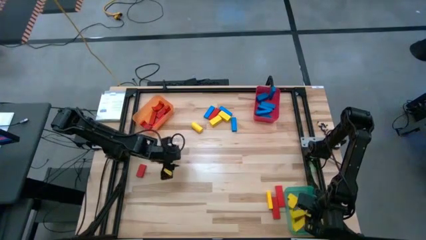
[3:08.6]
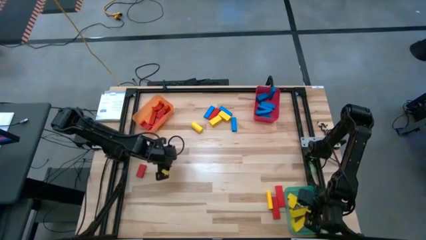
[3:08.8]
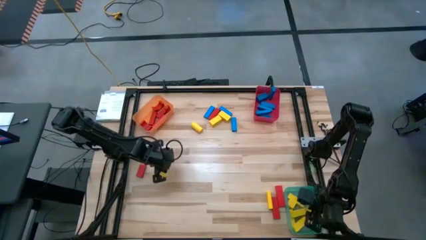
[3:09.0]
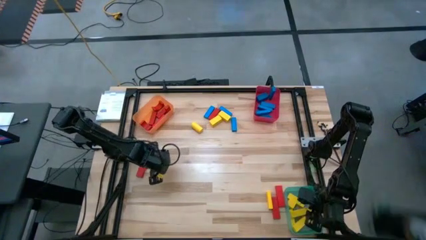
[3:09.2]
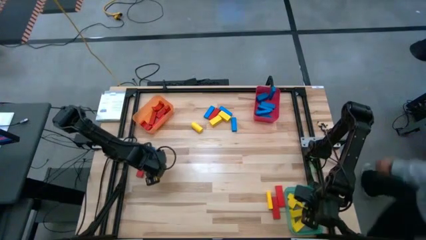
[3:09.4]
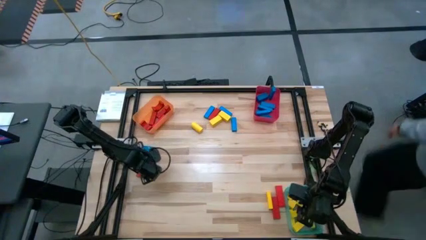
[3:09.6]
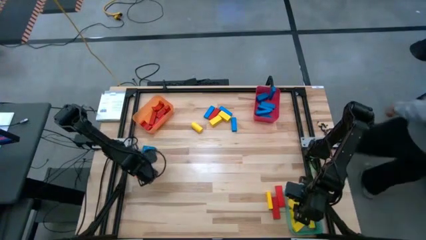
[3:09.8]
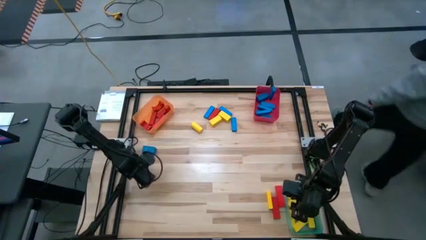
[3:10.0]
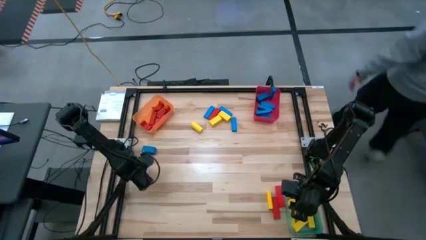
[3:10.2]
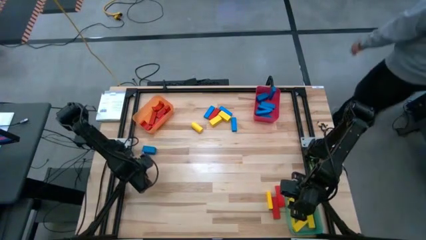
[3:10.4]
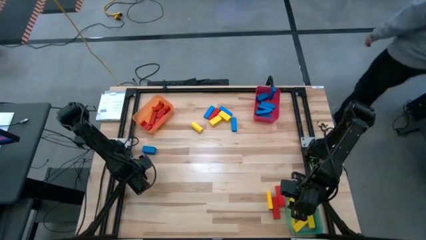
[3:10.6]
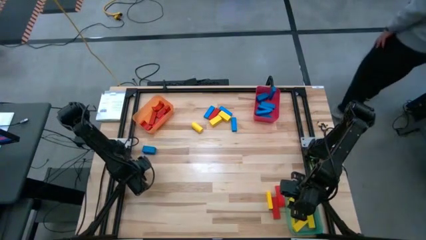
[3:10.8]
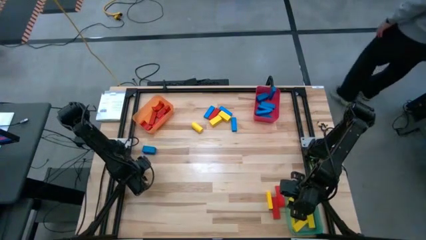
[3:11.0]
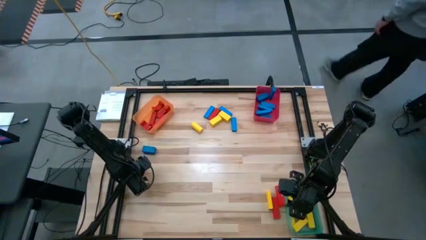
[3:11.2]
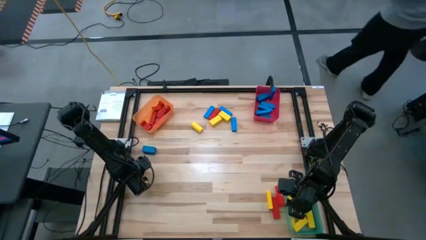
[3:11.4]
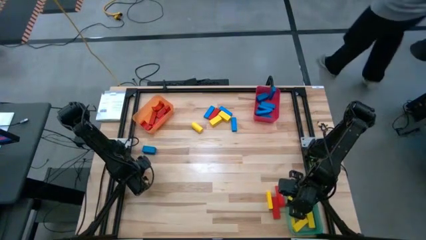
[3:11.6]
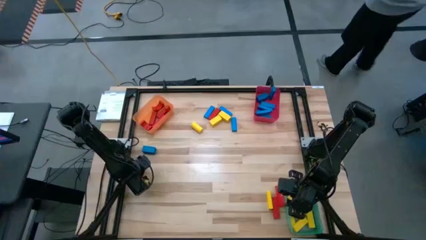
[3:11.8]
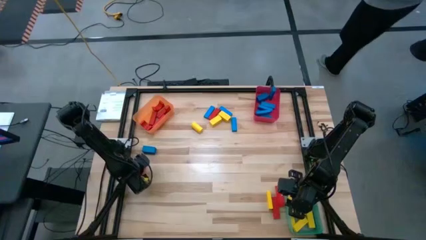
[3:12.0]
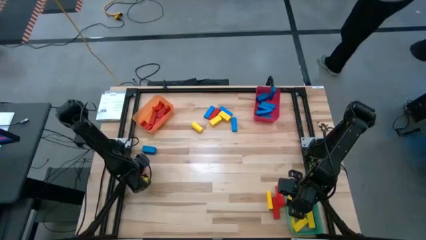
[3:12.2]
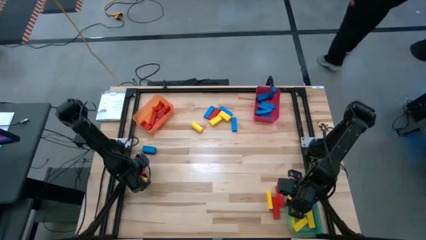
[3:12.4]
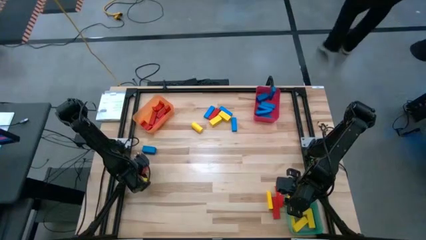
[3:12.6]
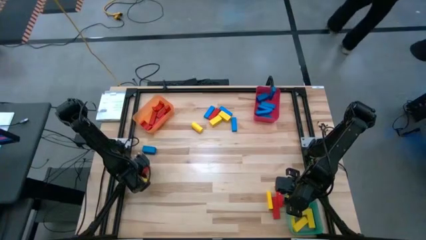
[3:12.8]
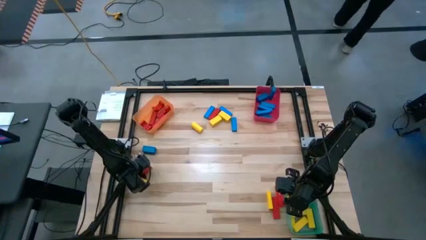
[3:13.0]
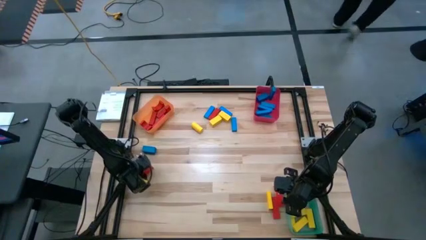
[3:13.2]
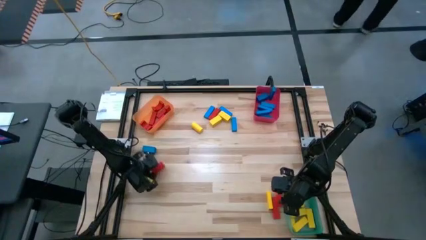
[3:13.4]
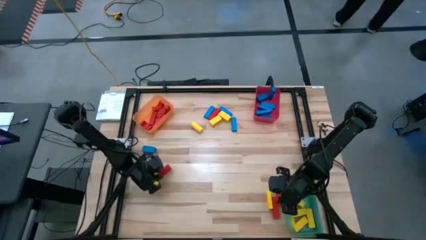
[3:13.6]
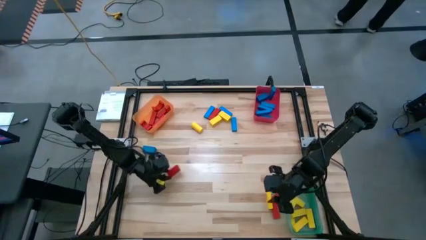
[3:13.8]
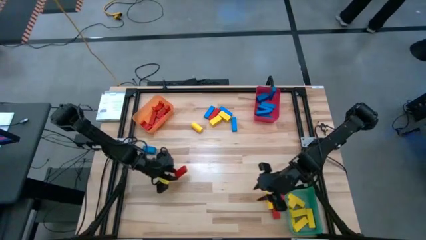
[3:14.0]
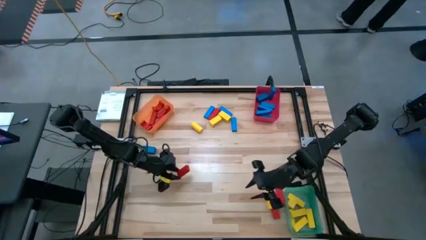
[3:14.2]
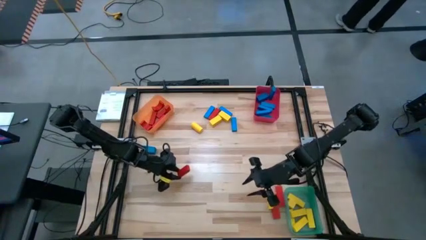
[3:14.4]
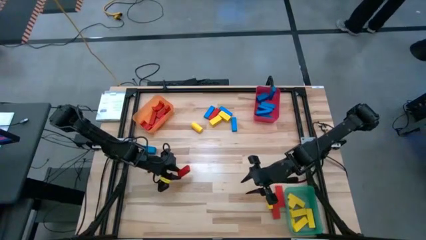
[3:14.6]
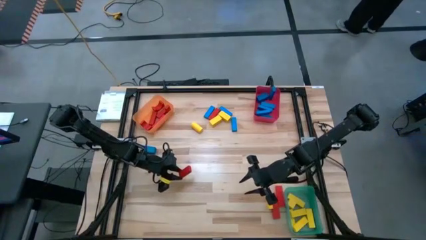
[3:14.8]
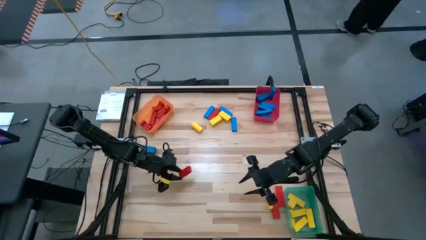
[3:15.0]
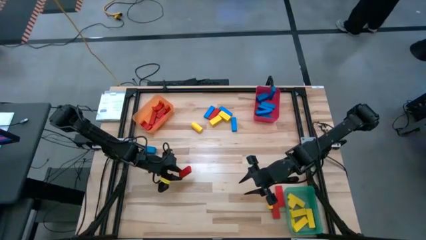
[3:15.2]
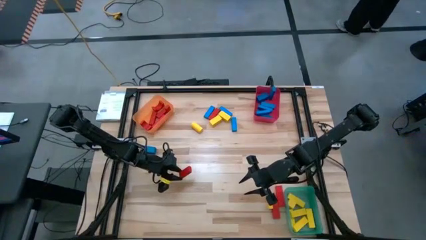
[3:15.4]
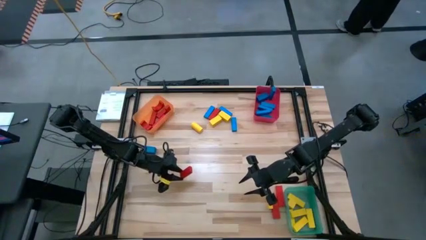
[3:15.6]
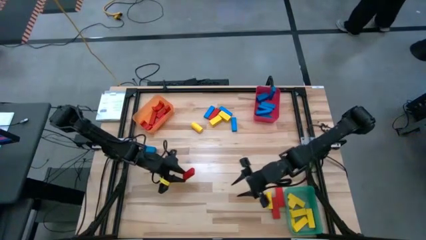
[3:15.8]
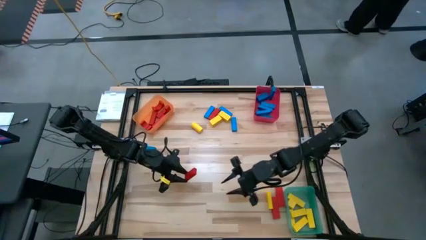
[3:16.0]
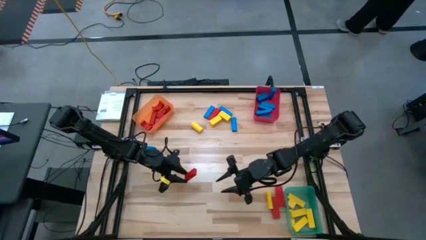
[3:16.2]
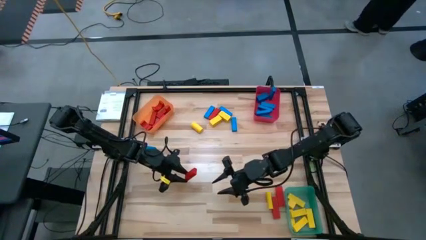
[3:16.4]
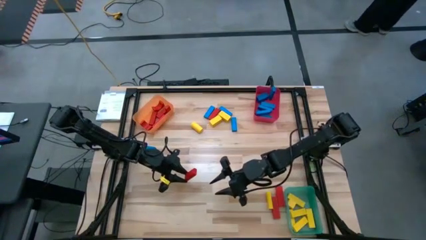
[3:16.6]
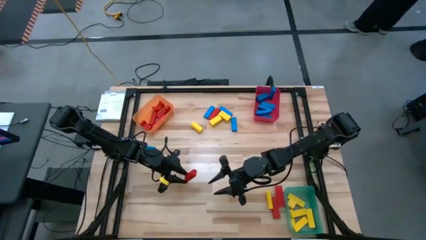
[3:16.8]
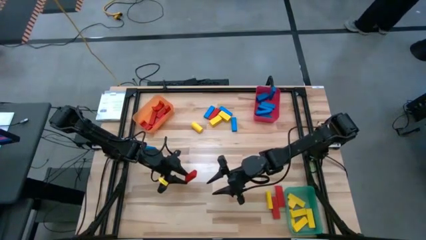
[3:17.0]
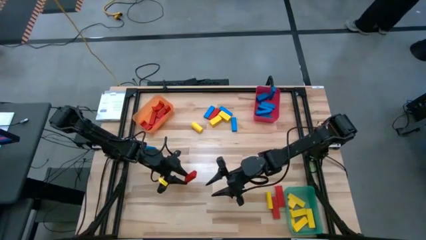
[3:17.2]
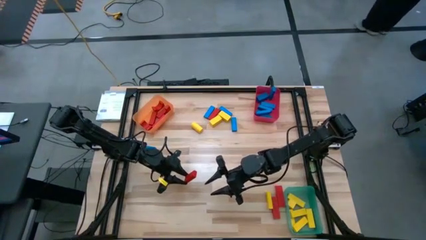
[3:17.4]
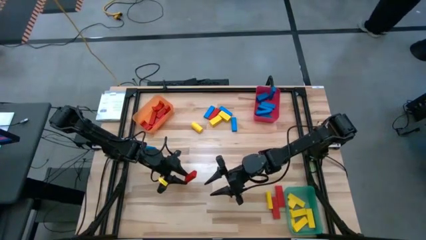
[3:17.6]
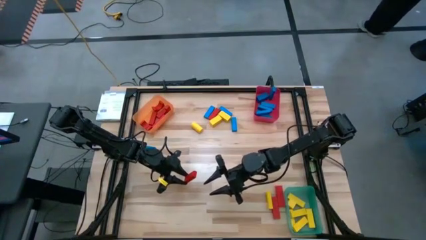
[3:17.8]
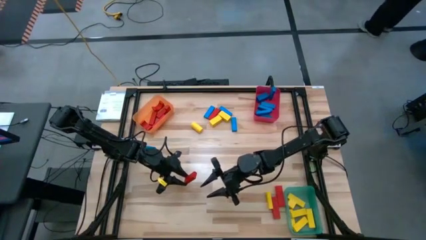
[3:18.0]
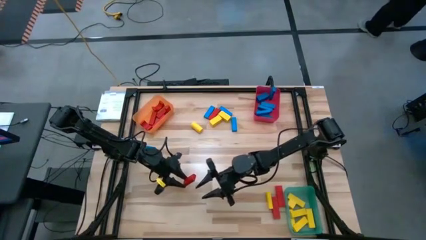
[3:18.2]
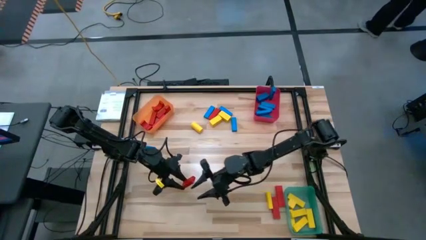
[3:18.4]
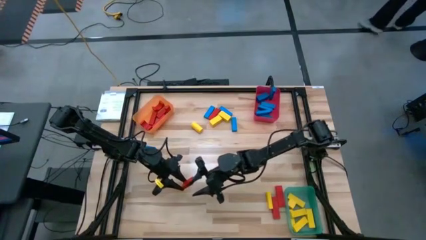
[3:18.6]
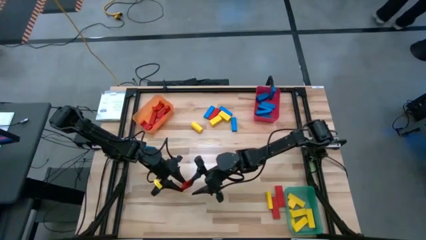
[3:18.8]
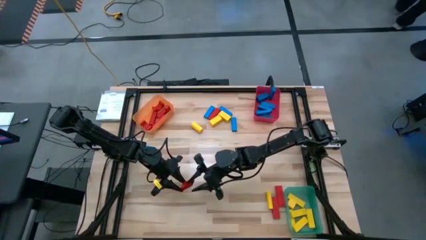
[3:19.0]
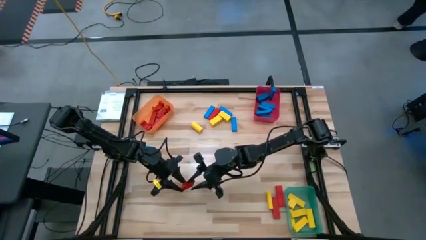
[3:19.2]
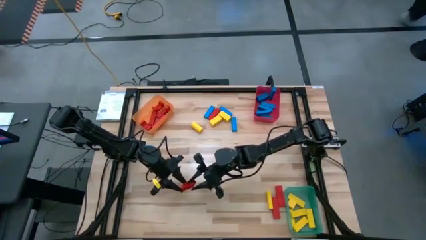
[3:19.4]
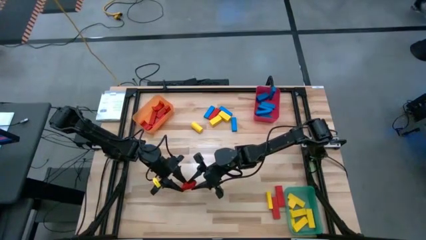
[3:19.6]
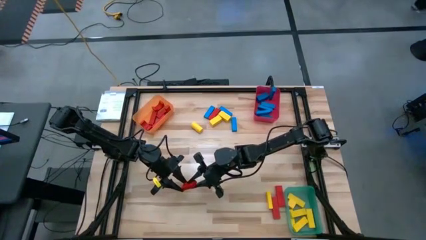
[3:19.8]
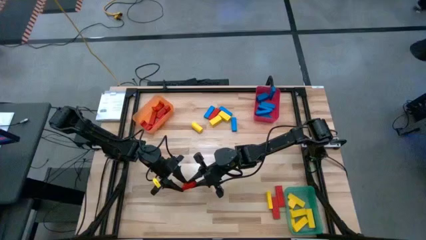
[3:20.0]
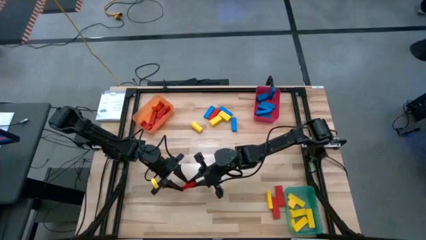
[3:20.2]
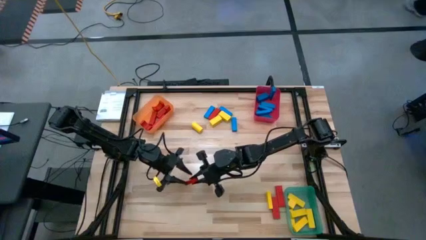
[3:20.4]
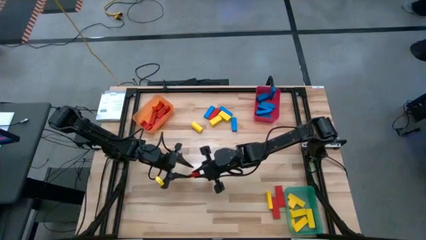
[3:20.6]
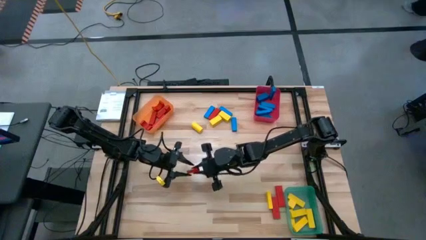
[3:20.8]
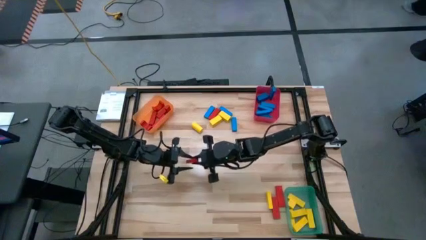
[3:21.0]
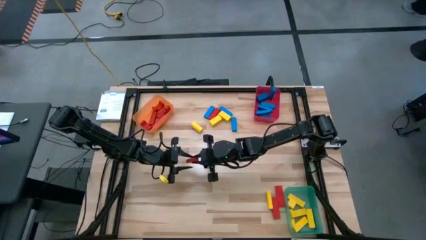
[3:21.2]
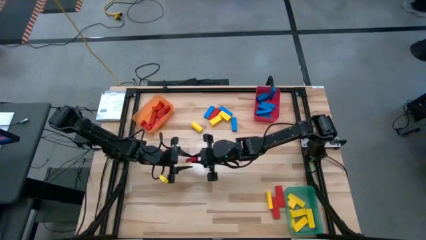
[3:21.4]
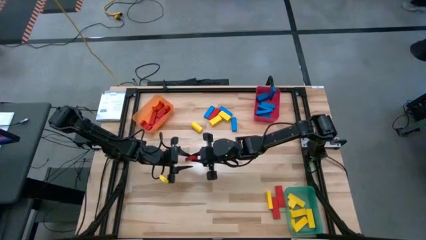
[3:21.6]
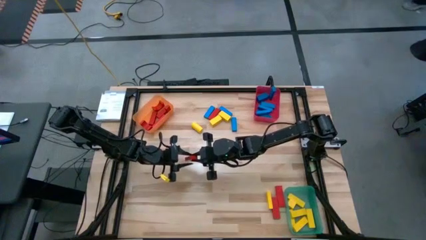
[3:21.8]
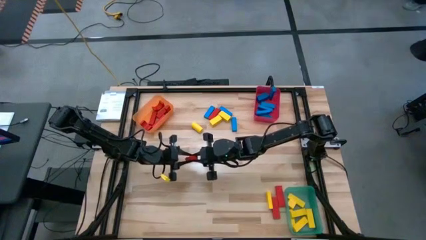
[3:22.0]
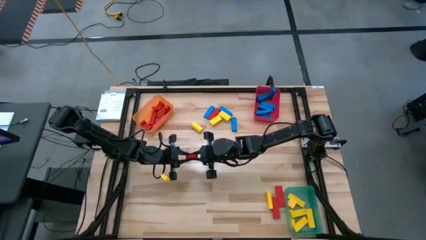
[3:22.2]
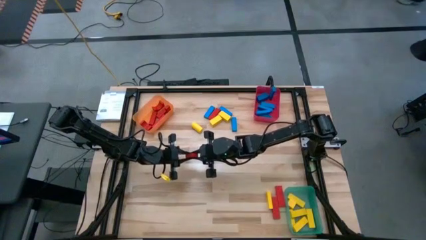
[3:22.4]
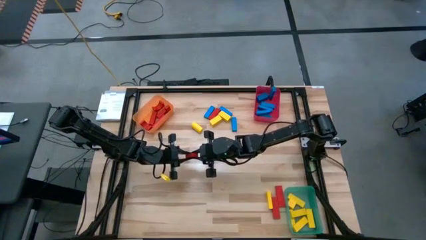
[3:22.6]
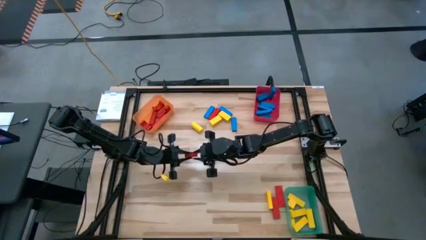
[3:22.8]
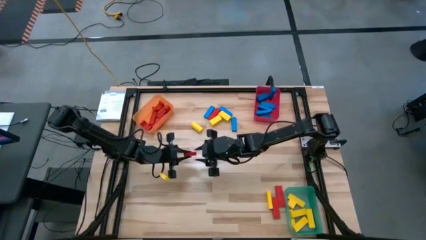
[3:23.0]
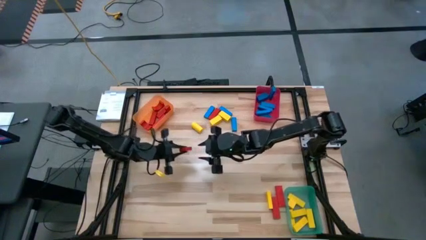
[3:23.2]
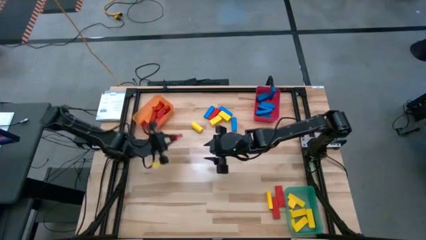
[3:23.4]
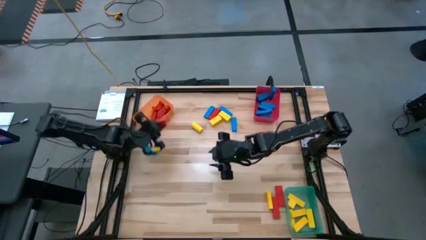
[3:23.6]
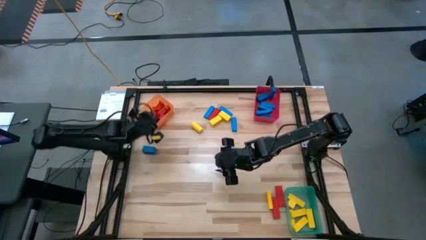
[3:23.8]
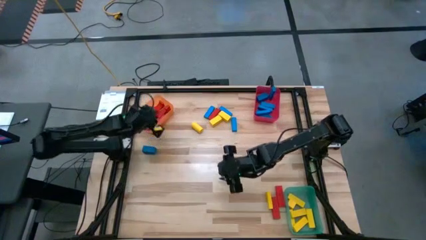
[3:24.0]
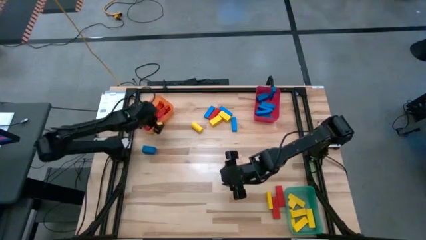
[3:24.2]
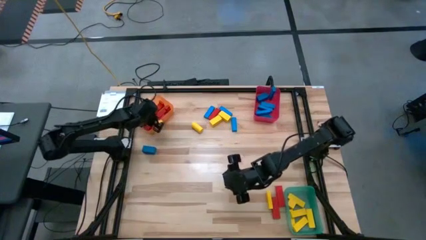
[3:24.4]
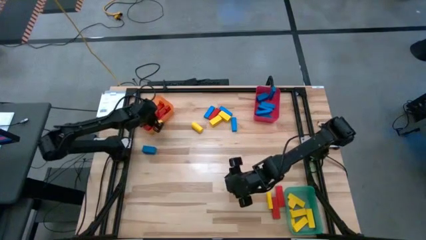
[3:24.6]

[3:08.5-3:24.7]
Task: Sort blocks
Put the red block into the orange bin
